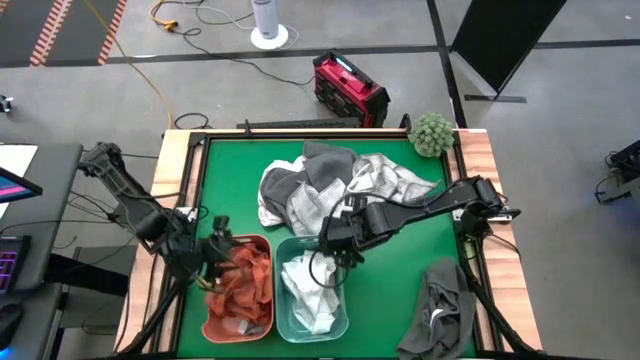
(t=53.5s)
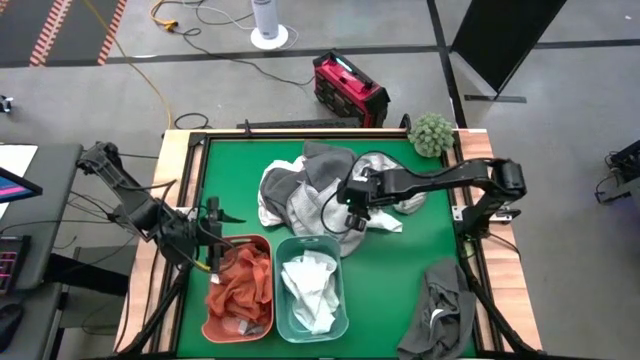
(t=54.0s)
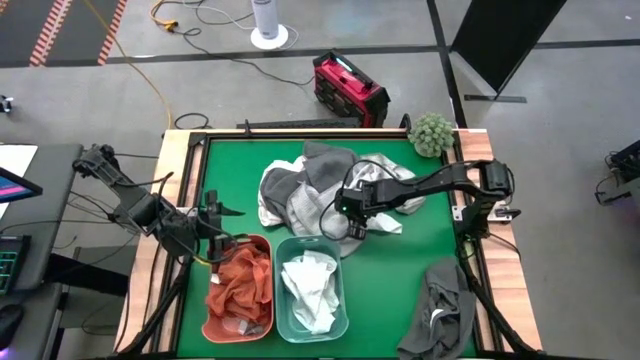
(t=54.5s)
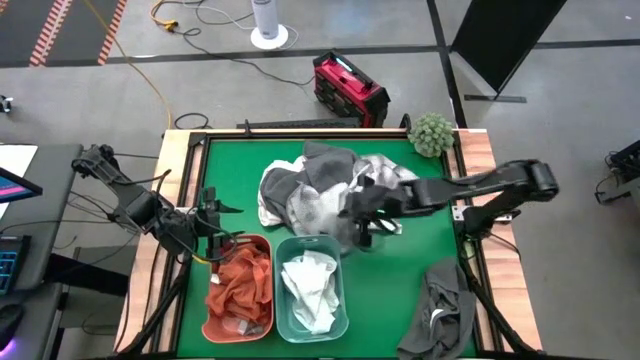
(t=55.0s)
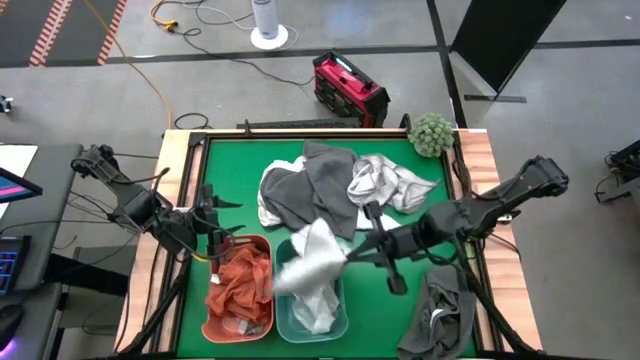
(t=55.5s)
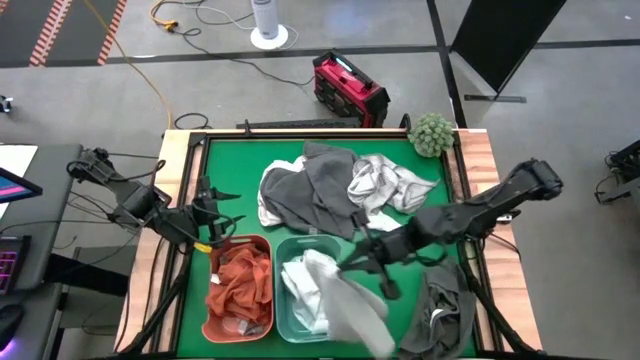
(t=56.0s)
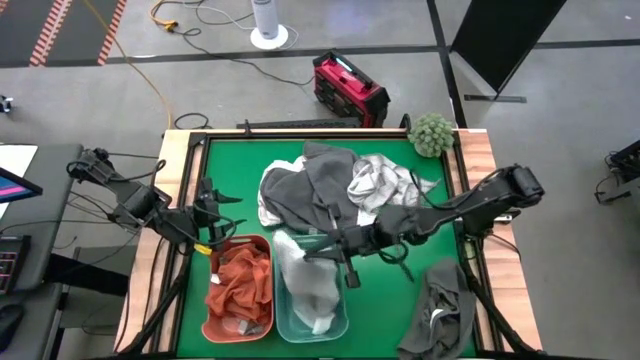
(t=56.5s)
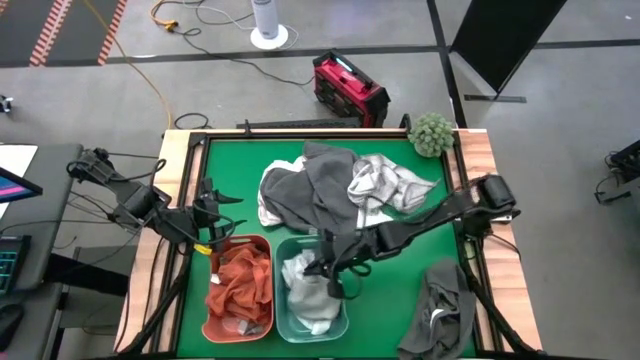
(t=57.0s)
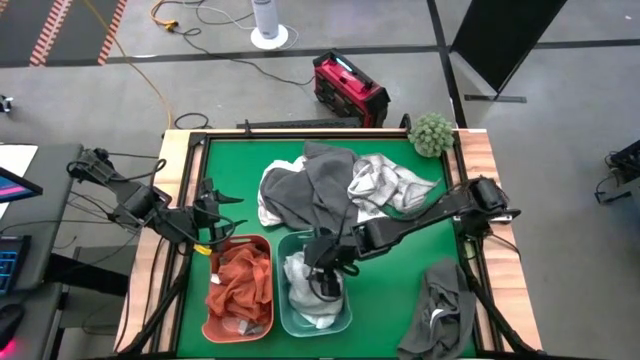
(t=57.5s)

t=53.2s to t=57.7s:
Task: Sort towels by color in basket
Put the bottom light gray towel into the green bin

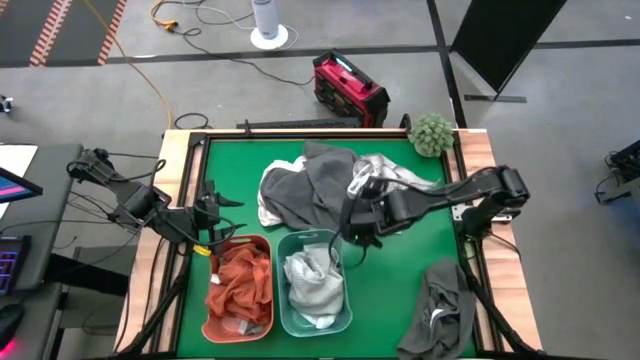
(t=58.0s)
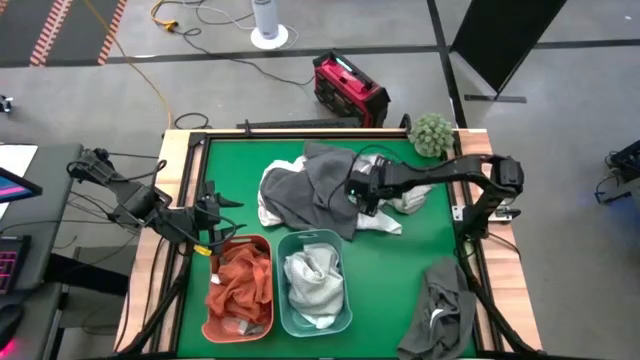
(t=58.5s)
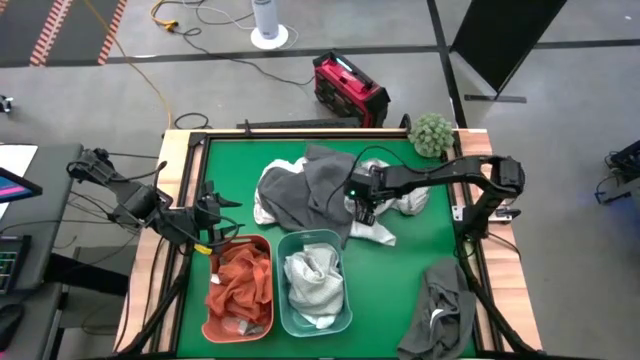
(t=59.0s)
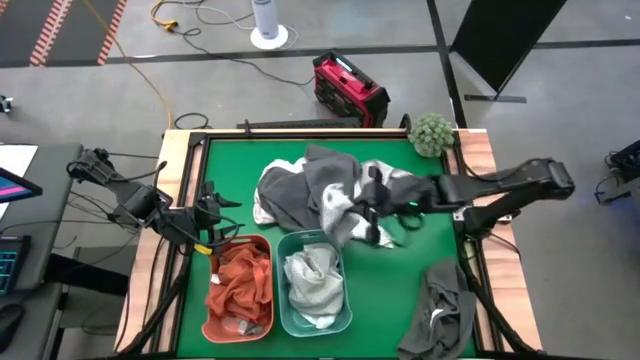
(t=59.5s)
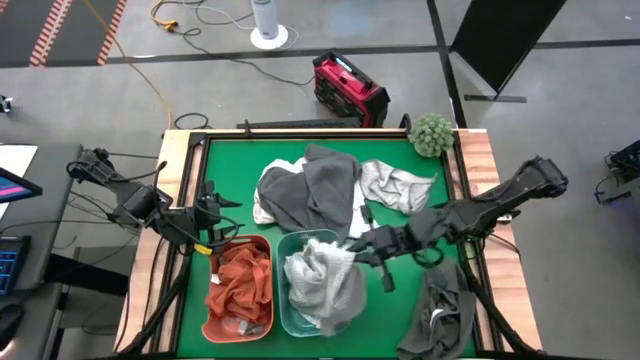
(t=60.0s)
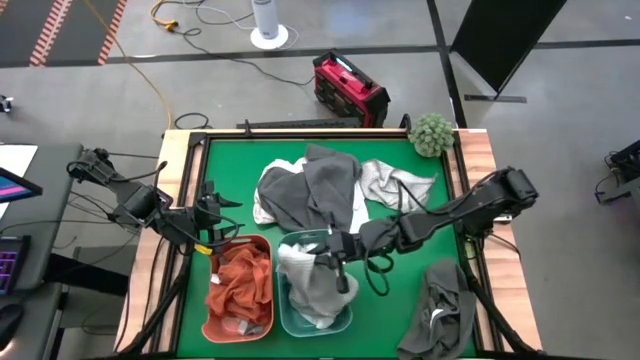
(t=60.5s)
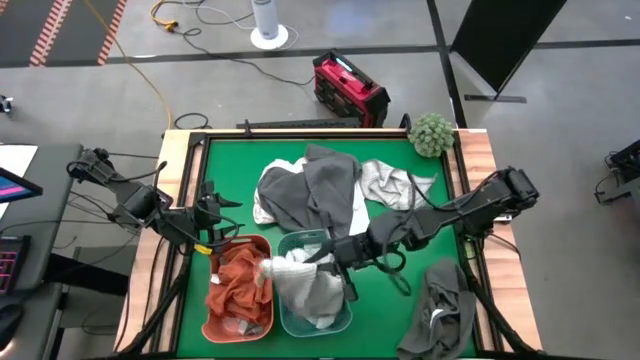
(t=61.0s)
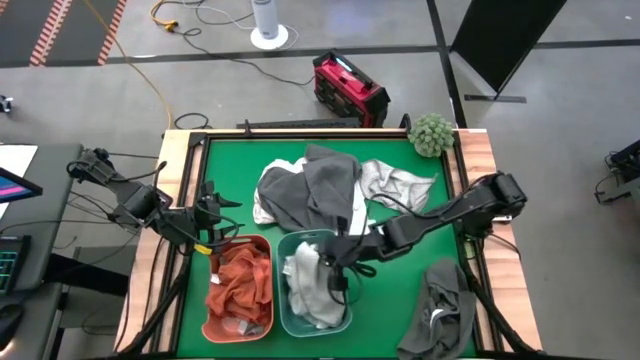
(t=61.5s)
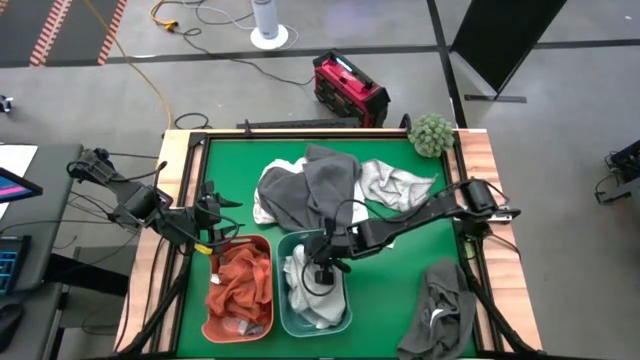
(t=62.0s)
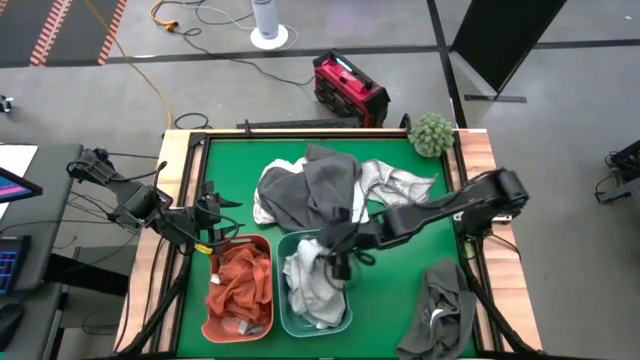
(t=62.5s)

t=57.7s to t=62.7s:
Put the left light gray towel into the green bin

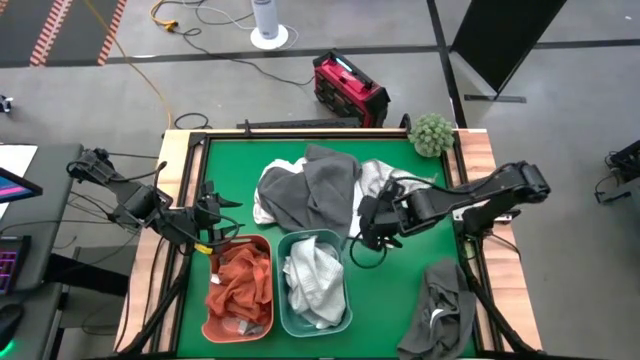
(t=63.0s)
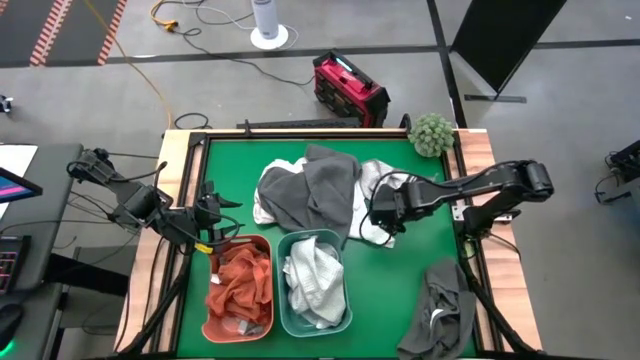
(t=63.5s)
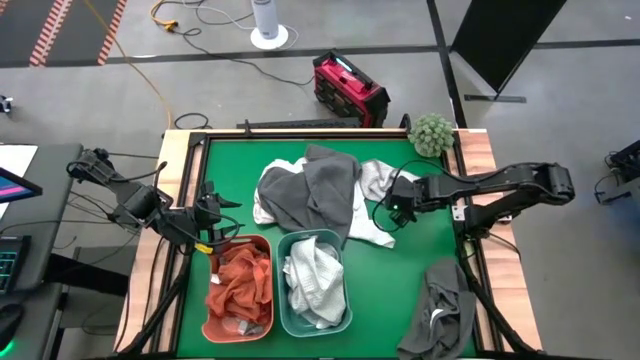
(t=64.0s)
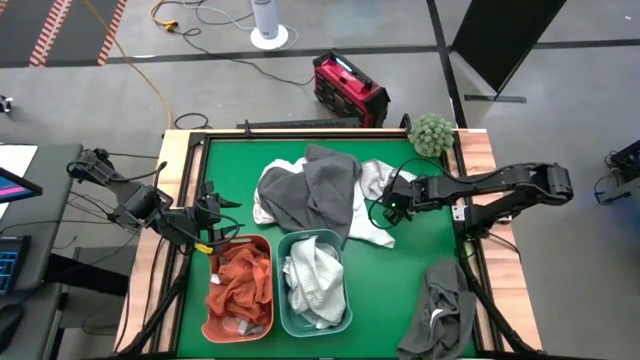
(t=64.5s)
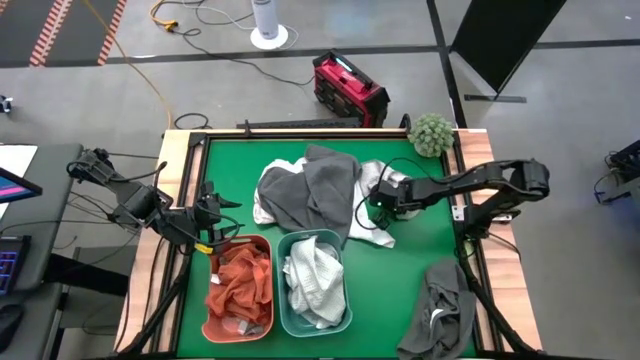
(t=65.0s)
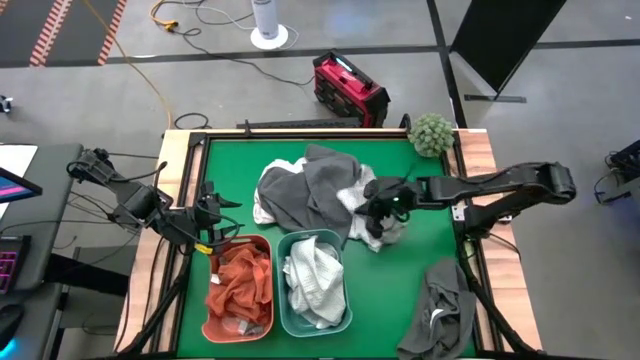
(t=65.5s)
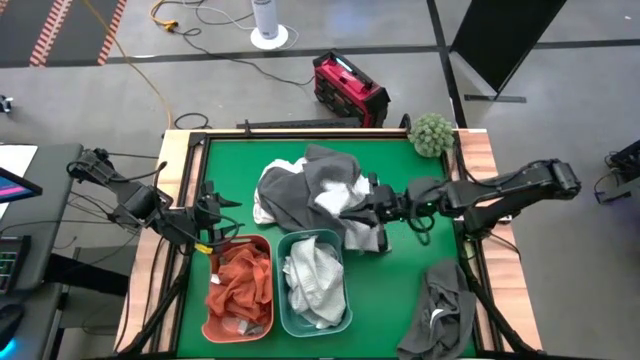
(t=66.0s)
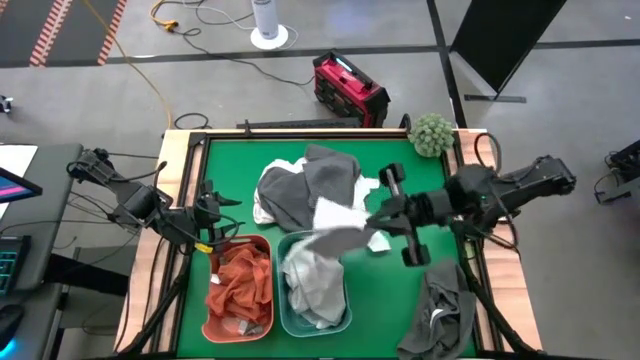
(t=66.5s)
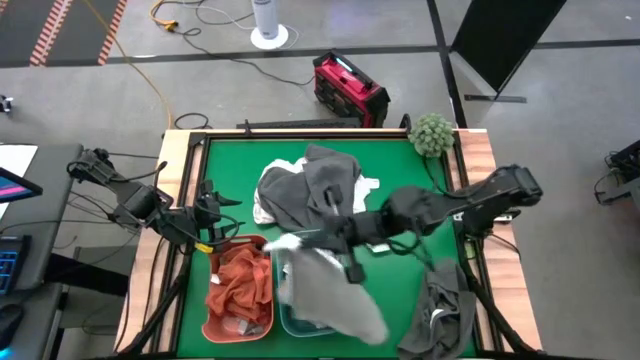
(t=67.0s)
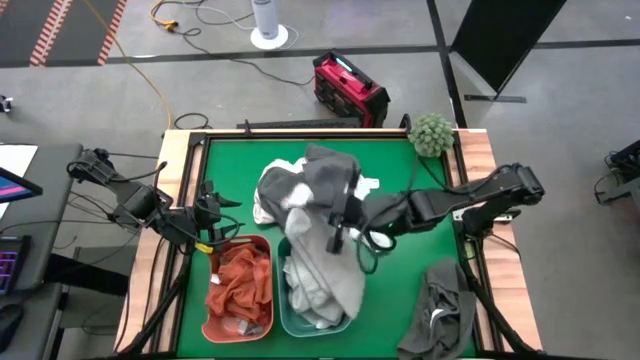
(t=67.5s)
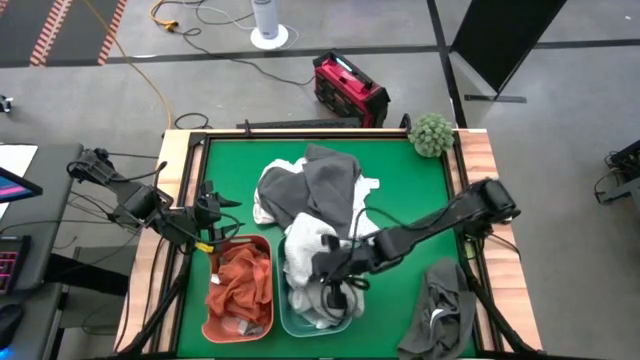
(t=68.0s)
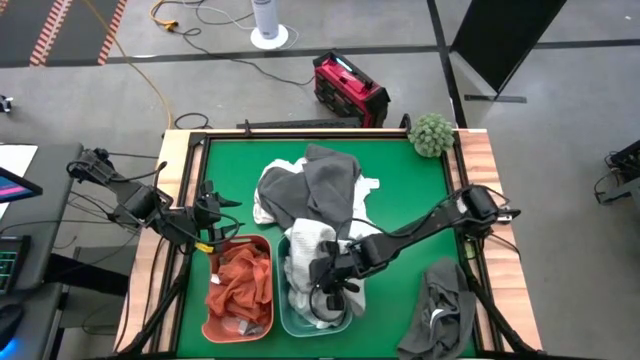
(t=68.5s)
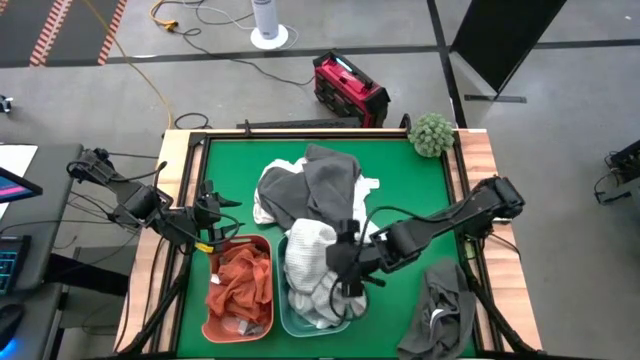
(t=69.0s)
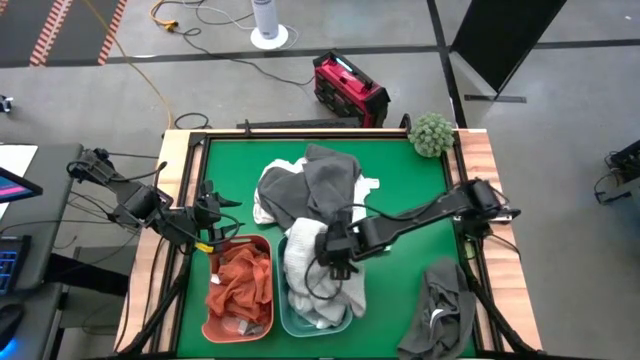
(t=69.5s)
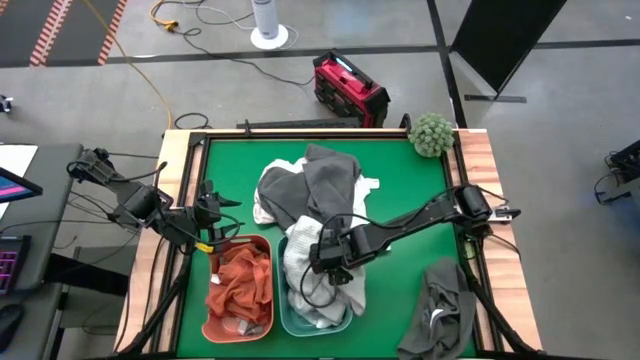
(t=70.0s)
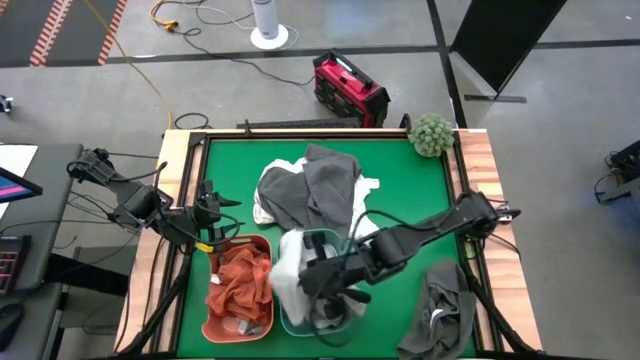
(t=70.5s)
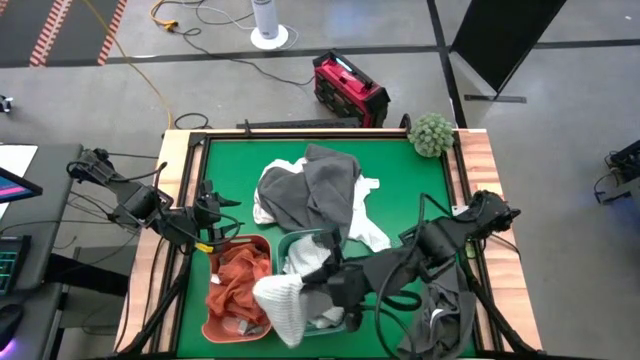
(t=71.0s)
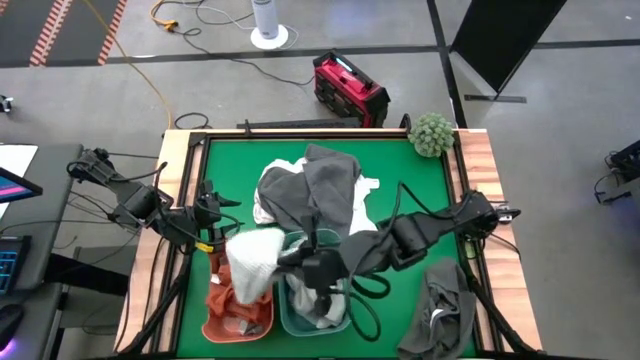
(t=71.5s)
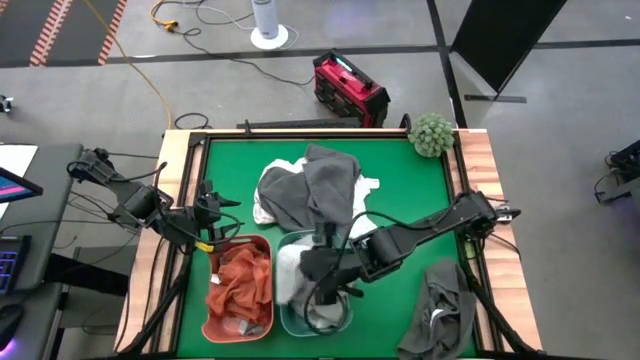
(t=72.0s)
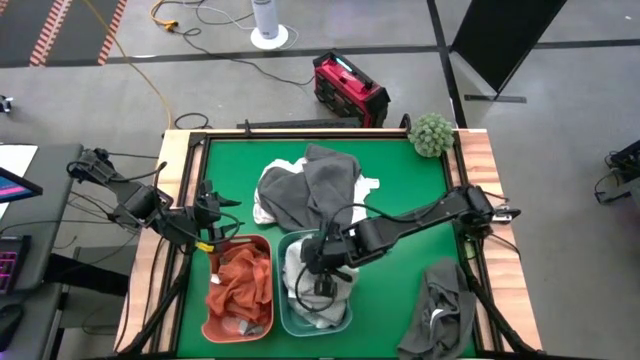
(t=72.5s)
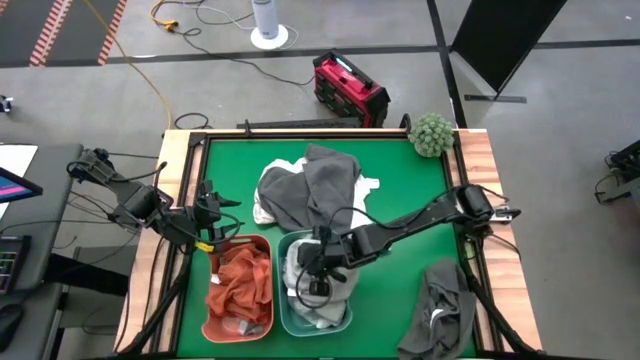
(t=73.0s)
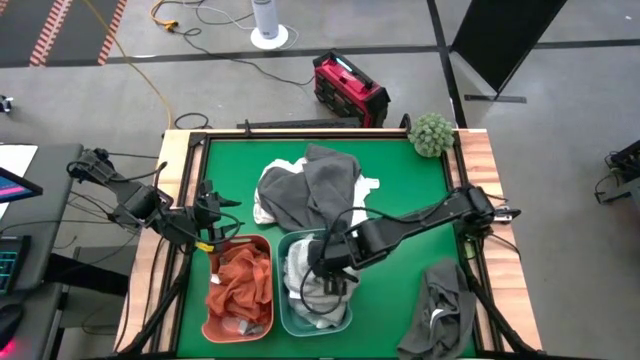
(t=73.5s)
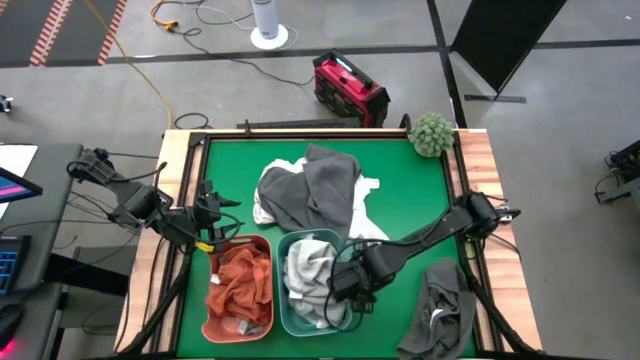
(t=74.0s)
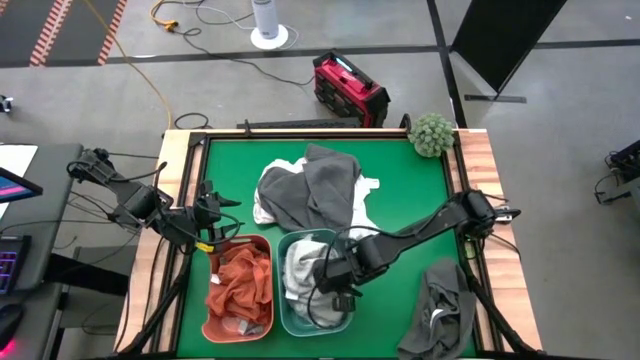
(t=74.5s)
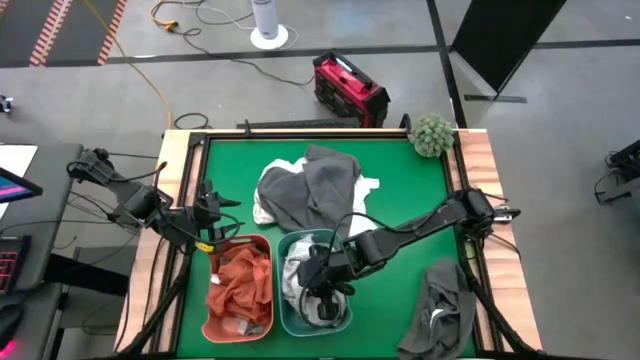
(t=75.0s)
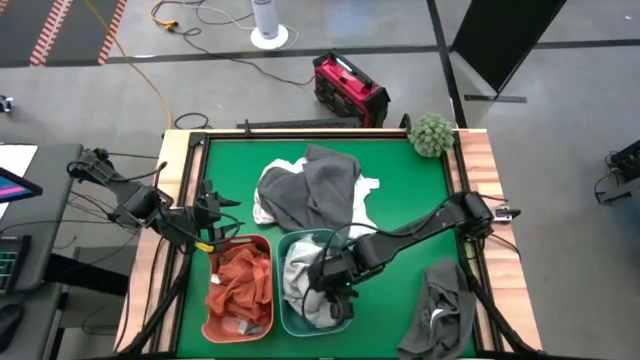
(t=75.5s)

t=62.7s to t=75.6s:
Put the light gray towel into the green bin
